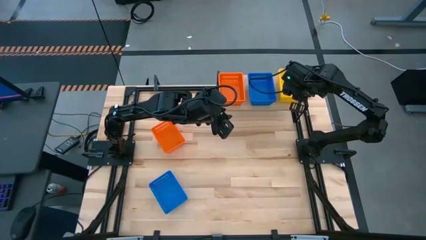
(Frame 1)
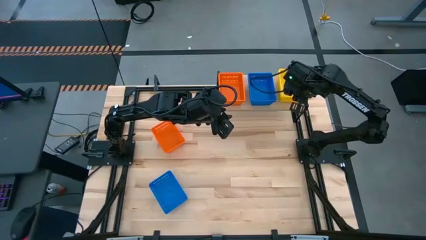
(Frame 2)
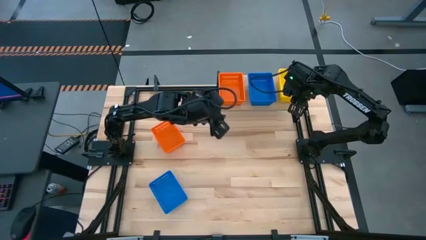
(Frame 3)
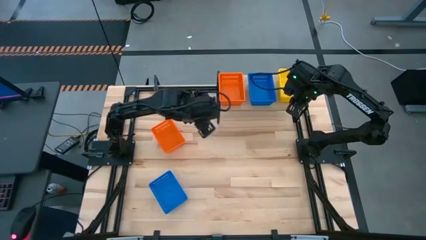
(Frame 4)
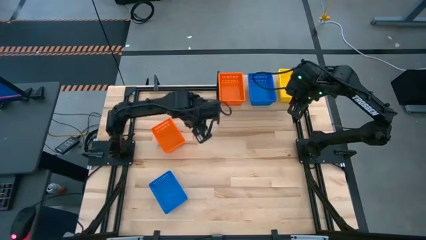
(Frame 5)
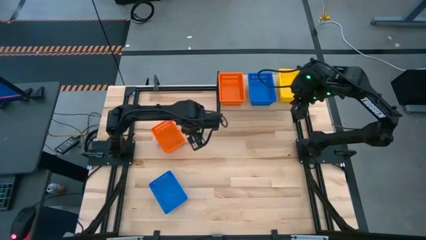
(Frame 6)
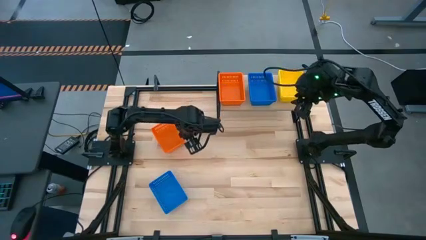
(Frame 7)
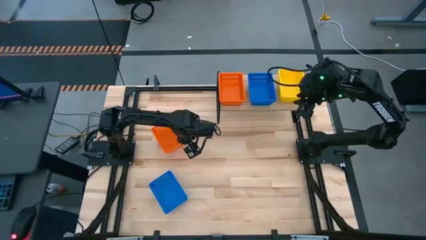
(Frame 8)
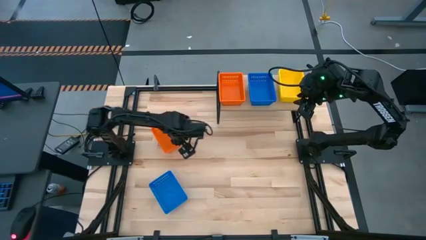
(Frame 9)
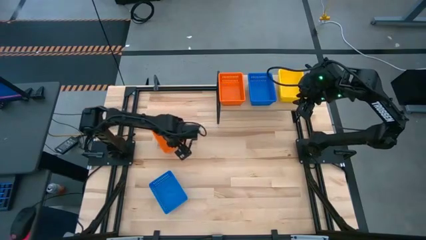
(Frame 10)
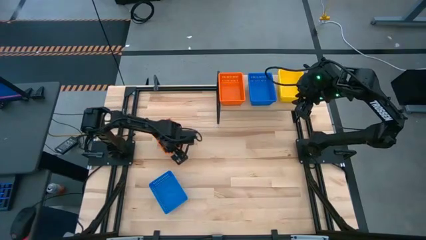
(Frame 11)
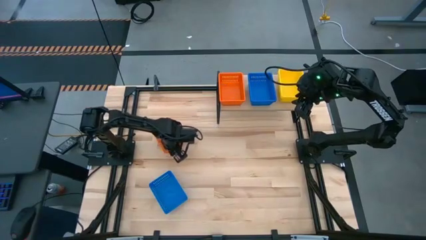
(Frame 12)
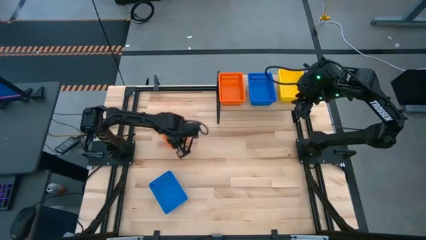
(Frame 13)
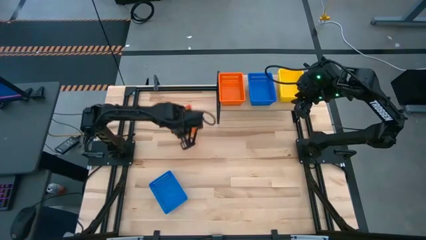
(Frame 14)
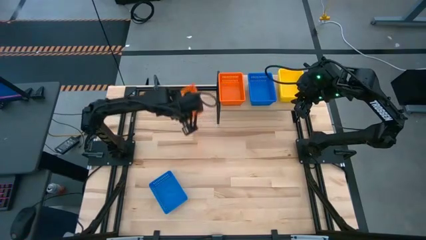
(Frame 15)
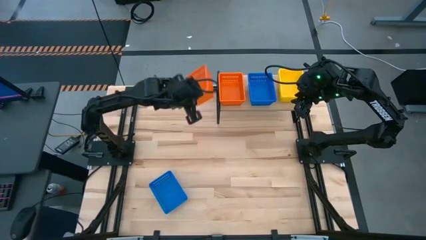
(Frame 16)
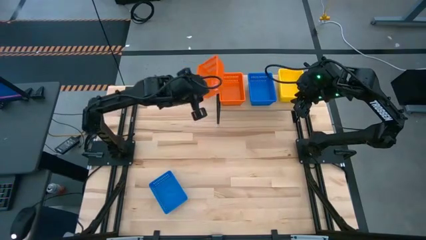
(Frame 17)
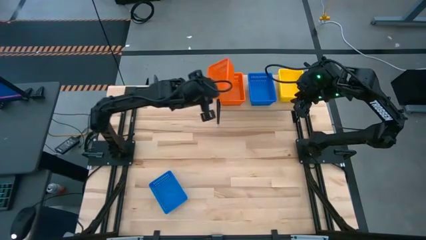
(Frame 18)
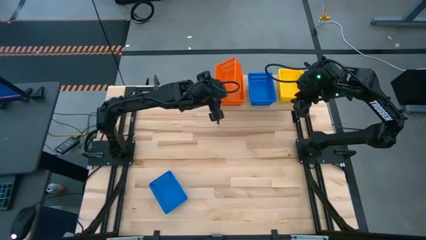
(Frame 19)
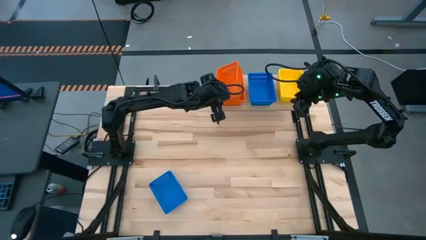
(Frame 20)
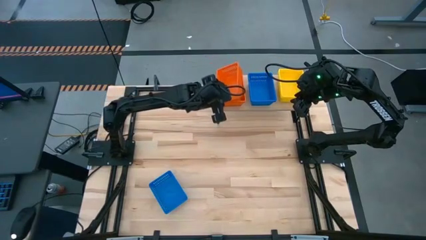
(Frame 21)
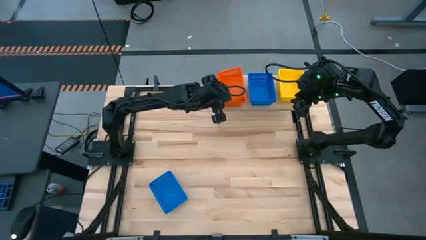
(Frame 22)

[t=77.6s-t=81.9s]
Task: Stack baskets on shelf by color
Stack the orange basket on top of the orange basket on the shelf

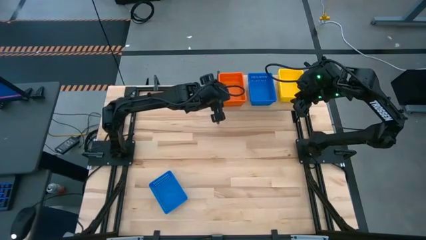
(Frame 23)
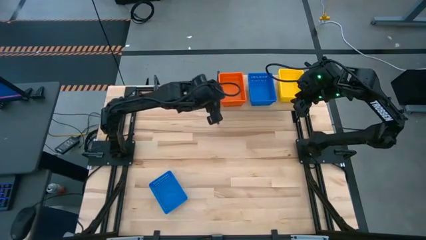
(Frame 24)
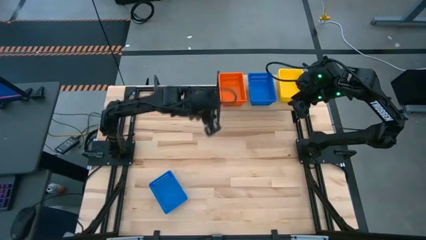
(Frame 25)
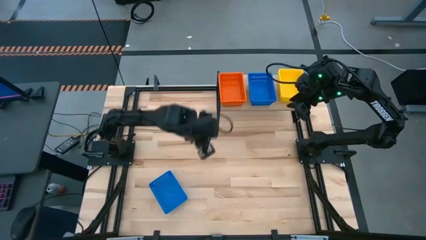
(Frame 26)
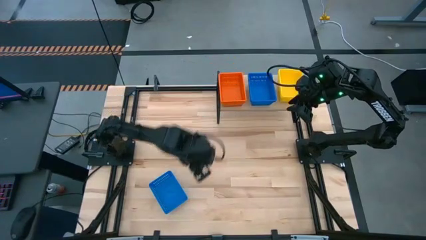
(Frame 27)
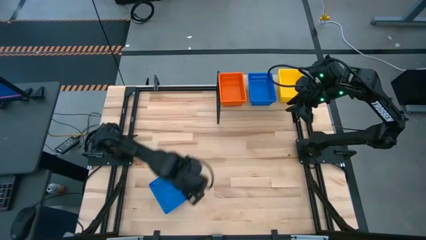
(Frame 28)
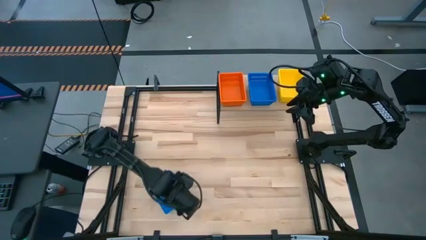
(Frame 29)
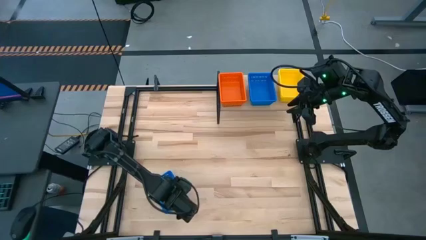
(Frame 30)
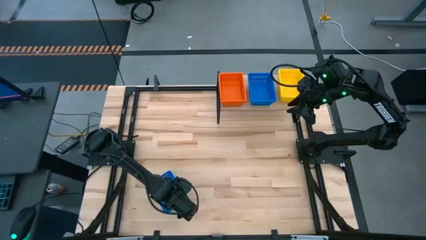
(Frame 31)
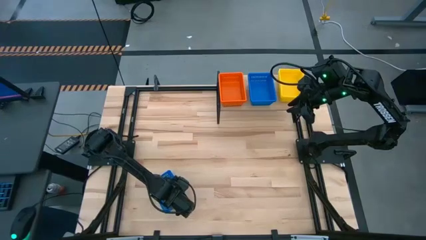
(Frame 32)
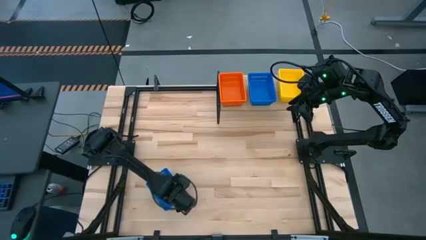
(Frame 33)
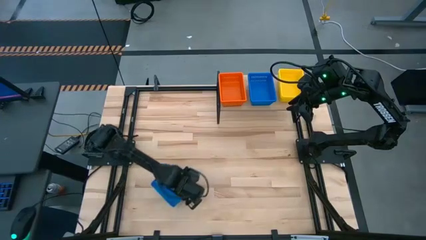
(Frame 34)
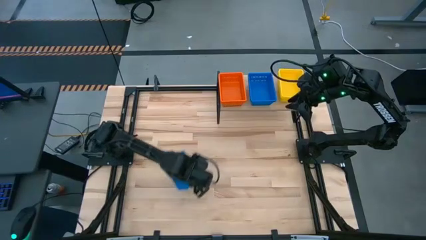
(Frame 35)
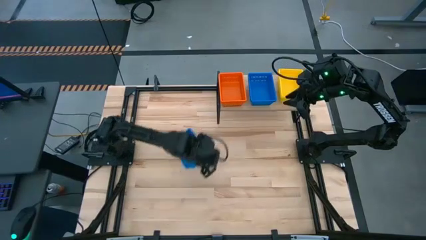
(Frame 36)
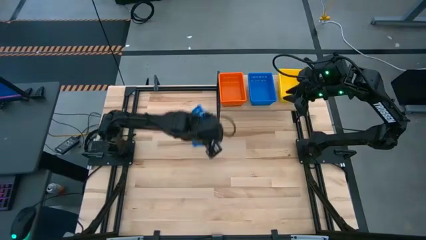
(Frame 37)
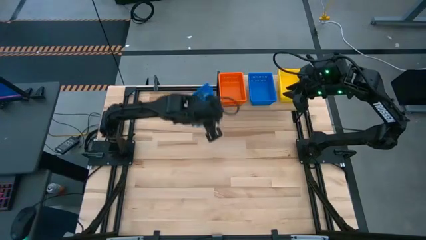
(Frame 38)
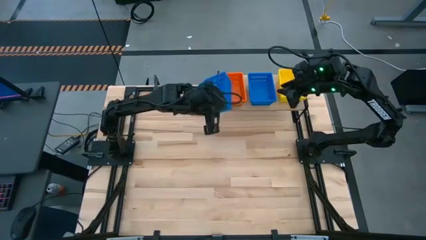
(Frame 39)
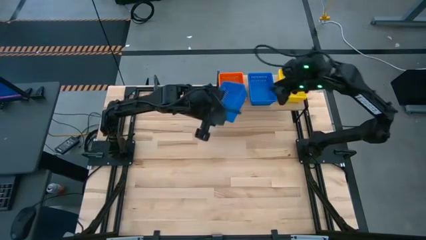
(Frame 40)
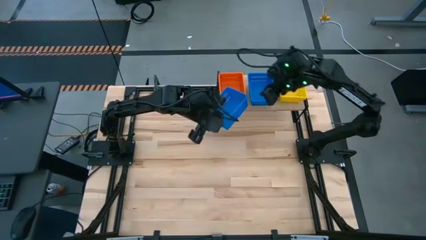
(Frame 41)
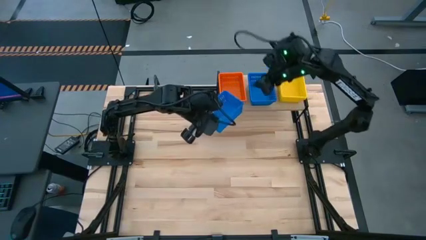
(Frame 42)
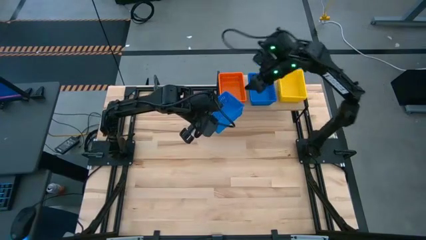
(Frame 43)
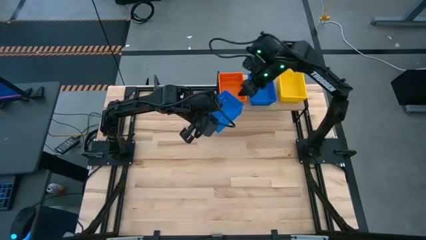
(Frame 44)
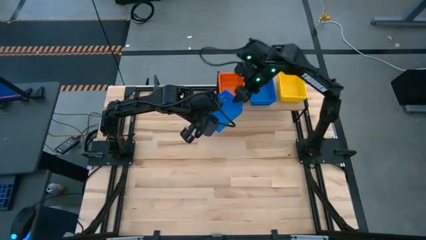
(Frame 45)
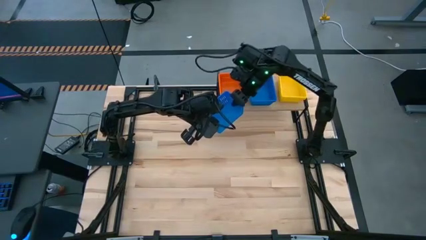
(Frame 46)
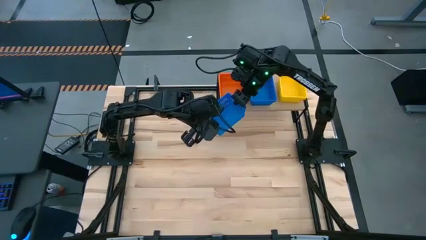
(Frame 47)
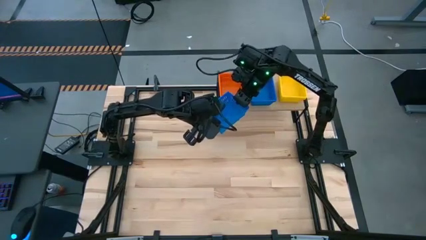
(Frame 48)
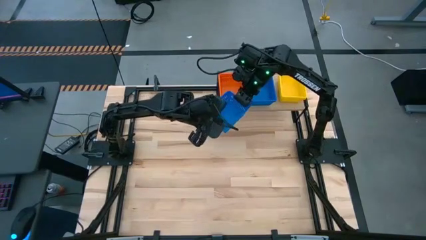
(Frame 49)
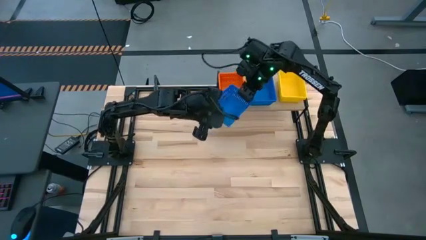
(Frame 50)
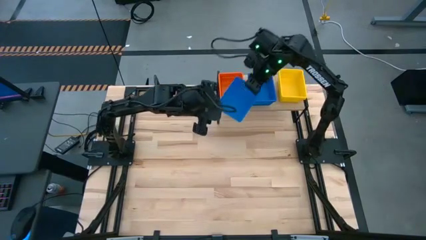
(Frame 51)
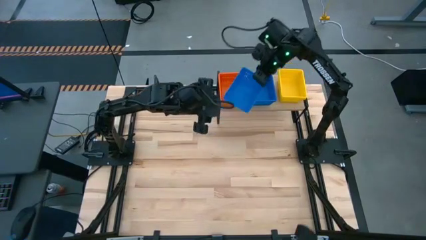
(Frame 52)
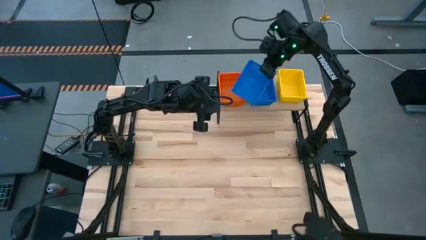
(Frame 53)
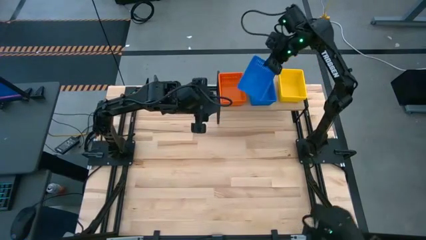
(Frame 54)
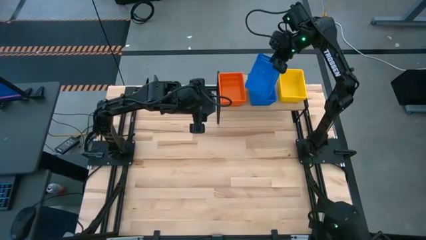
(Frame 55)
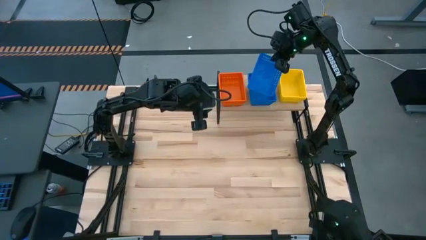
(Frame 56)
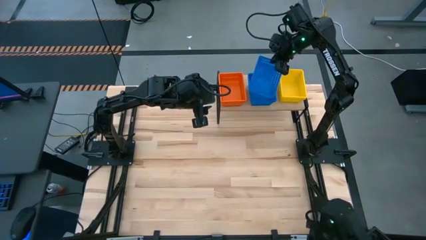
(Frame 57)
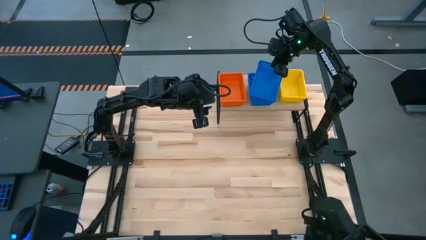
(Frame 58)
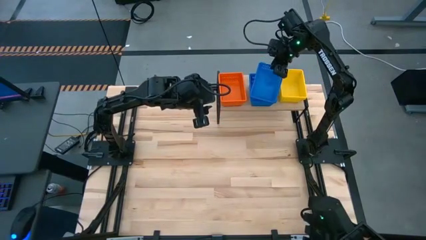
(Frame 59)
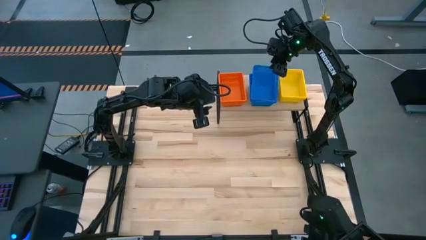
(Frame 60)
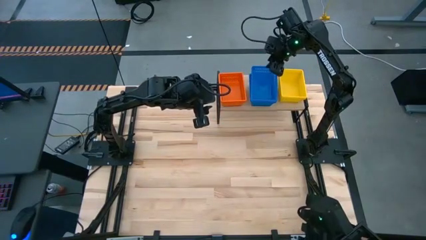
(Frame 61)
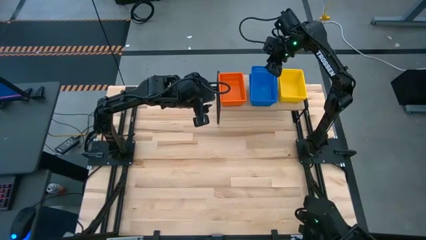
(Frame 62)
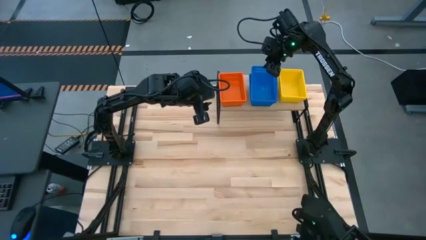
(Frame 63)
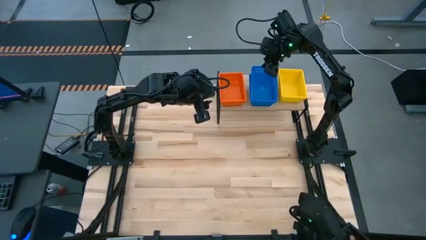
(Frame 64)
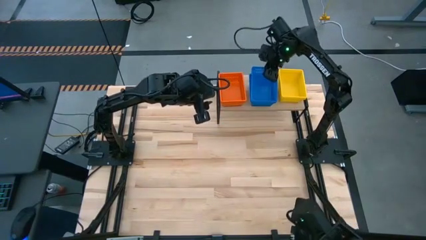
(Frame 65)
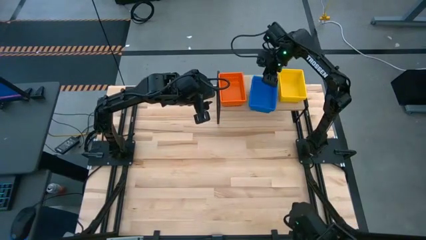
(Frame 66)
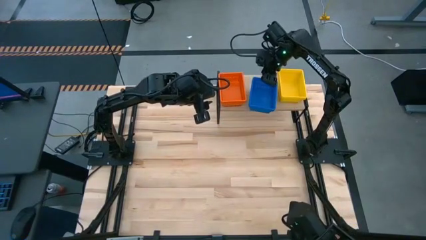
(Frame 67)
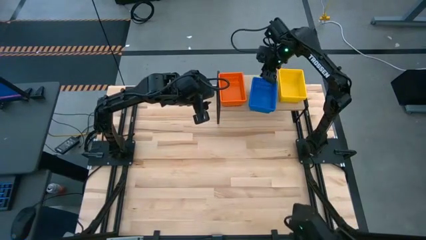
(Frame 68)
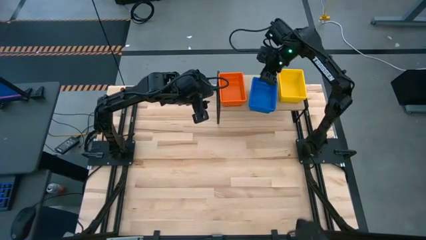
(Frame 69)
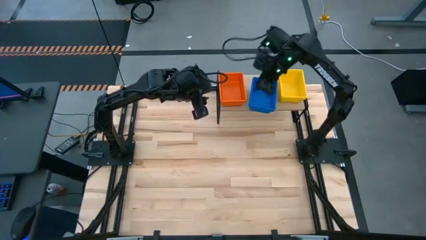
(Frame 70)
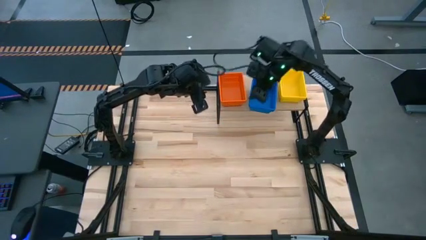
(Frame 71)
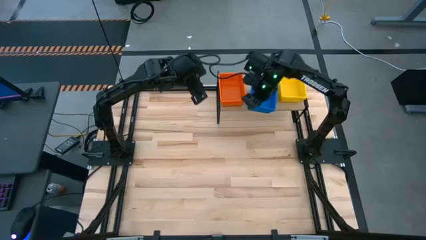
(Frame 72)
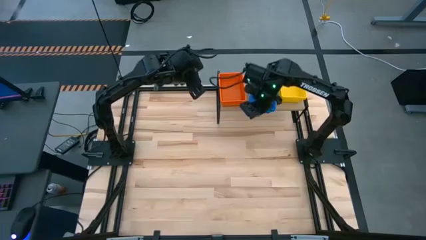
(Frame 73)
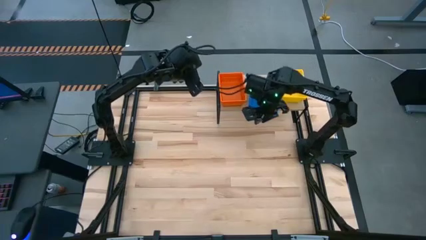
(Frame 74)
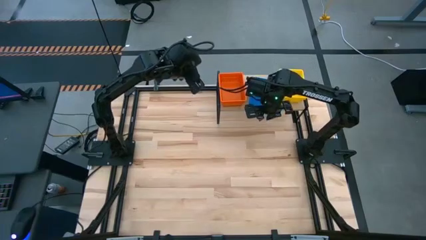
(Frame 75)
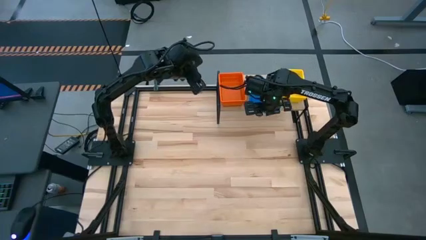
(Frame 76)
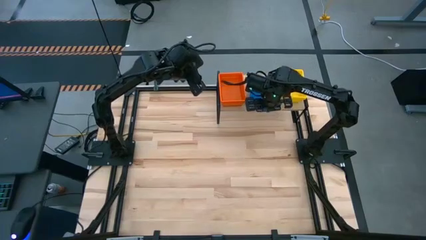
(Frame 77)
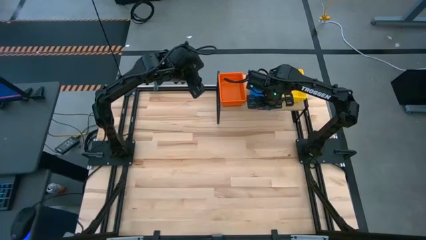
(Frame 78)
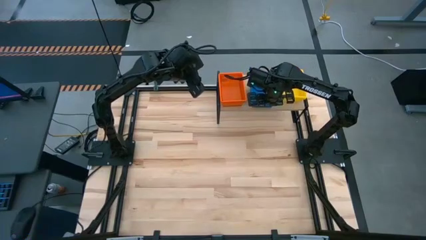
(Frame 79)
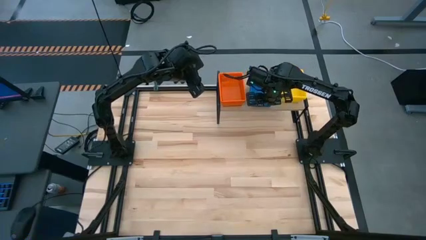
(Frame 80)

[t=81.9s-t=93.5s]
Stack the blue basket on top of the blue basket on the shelf
